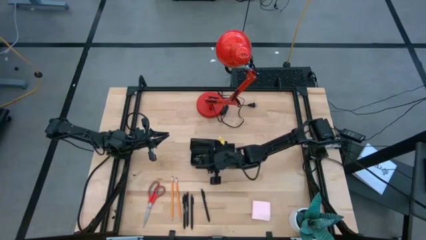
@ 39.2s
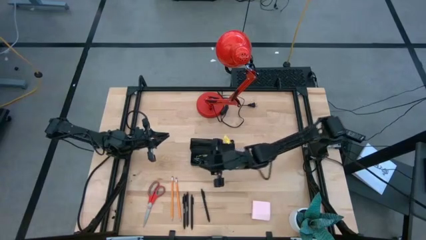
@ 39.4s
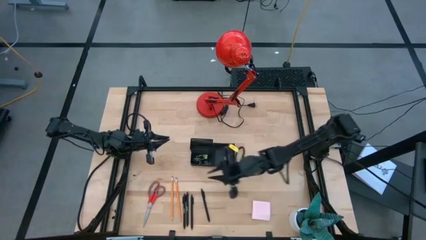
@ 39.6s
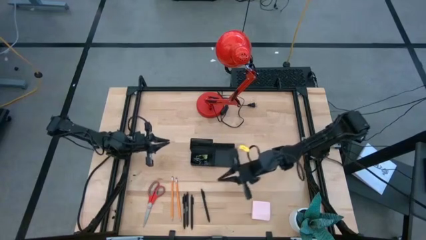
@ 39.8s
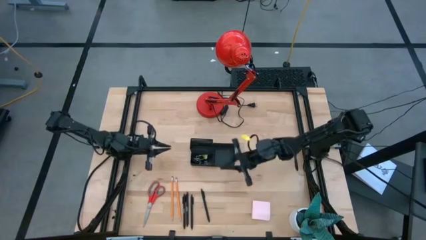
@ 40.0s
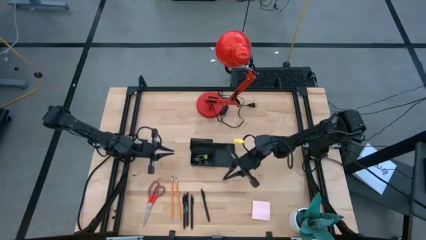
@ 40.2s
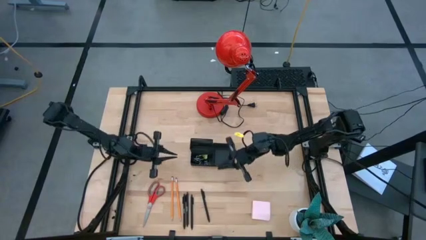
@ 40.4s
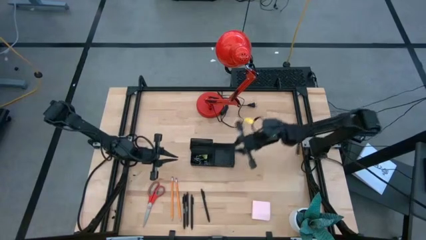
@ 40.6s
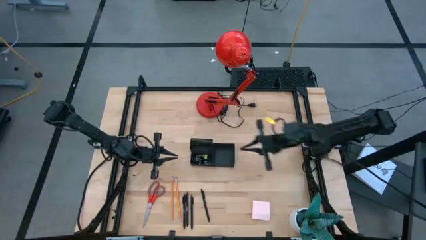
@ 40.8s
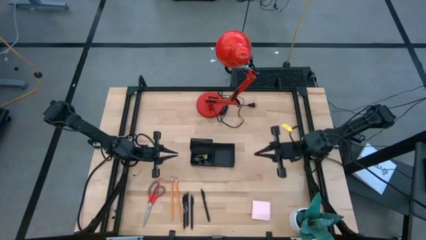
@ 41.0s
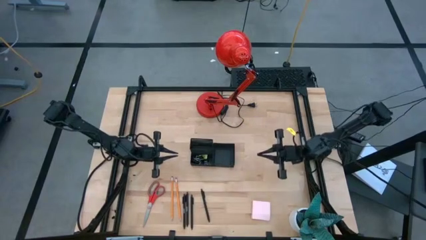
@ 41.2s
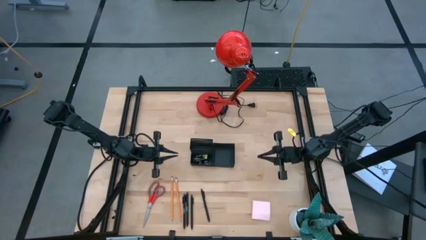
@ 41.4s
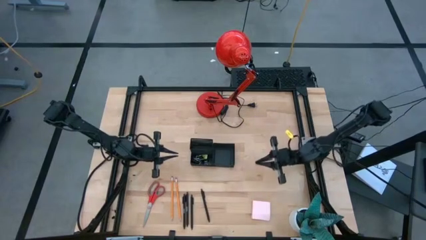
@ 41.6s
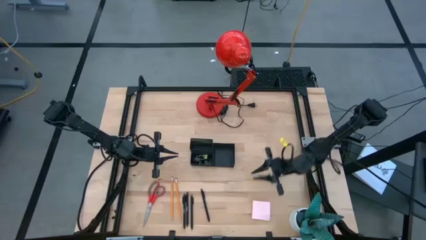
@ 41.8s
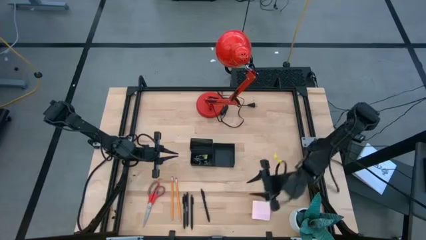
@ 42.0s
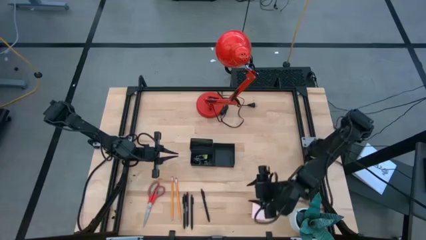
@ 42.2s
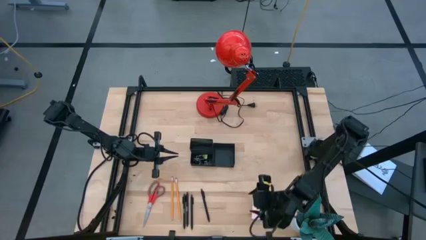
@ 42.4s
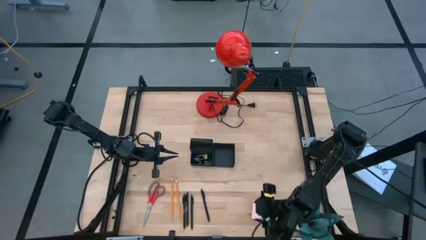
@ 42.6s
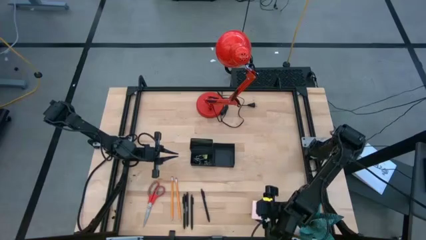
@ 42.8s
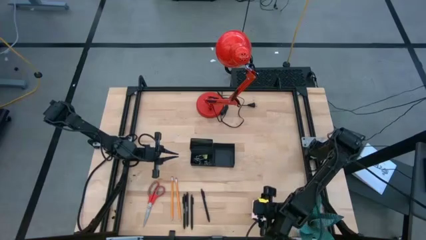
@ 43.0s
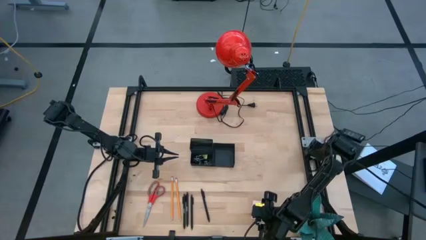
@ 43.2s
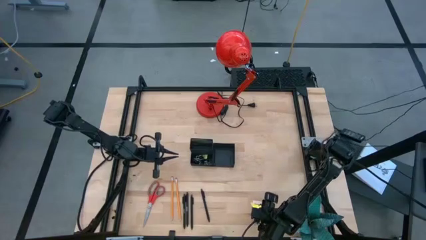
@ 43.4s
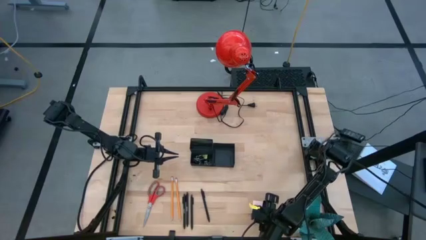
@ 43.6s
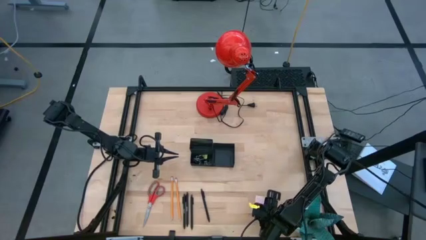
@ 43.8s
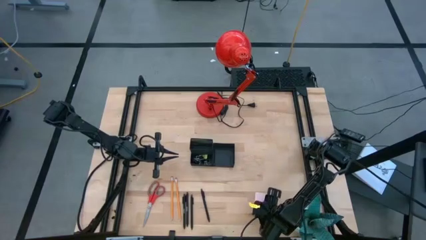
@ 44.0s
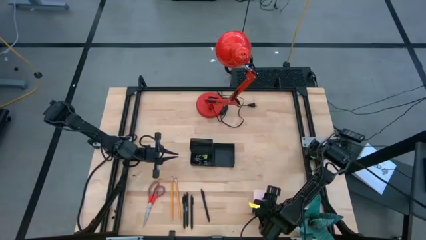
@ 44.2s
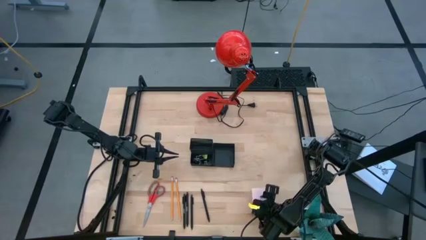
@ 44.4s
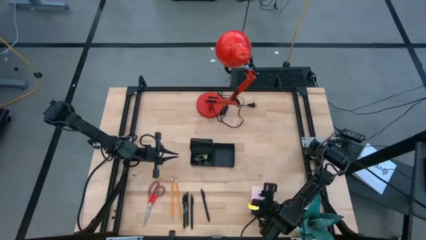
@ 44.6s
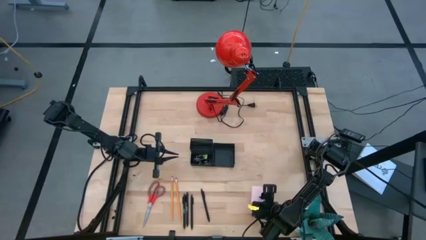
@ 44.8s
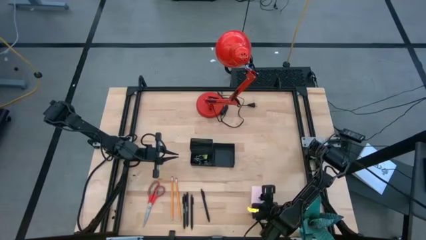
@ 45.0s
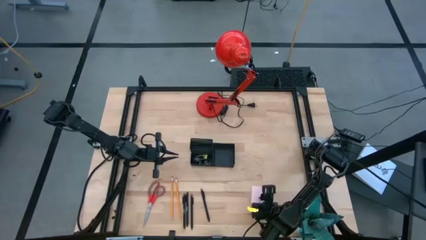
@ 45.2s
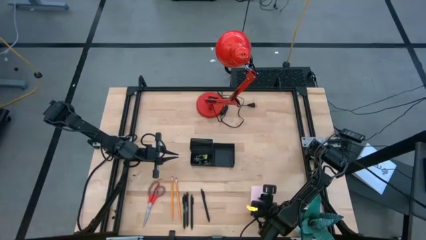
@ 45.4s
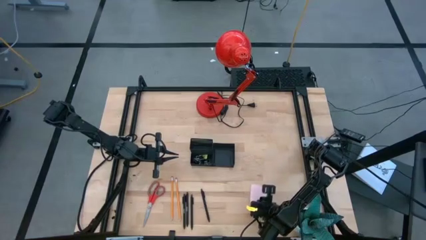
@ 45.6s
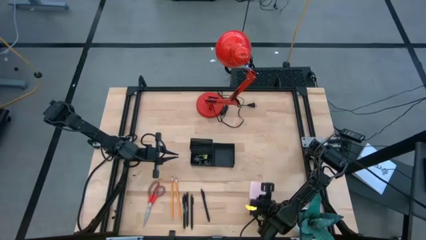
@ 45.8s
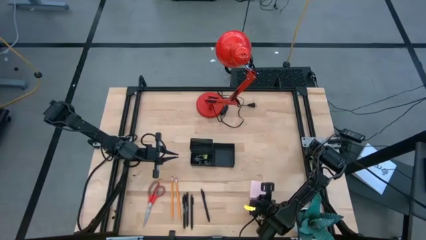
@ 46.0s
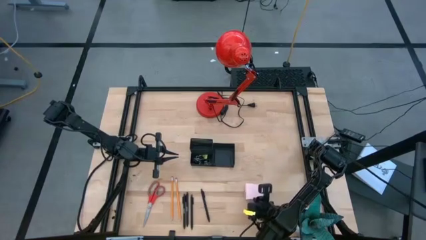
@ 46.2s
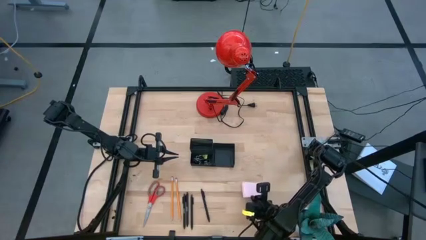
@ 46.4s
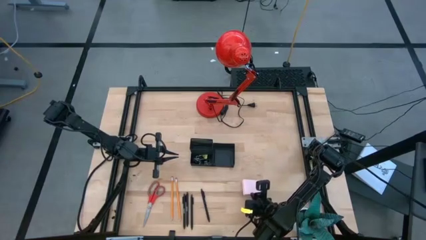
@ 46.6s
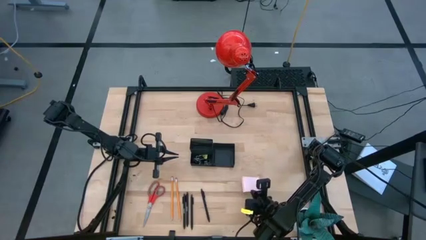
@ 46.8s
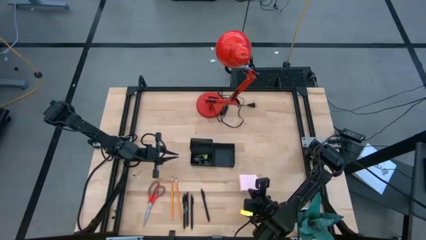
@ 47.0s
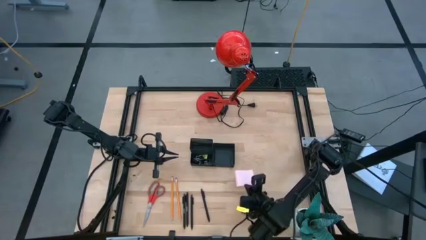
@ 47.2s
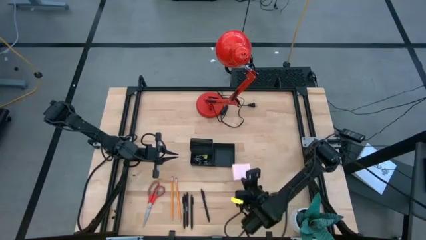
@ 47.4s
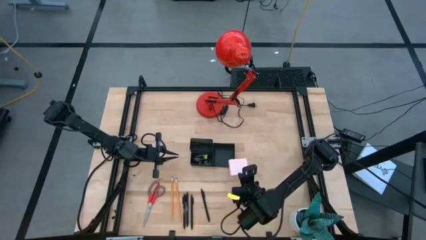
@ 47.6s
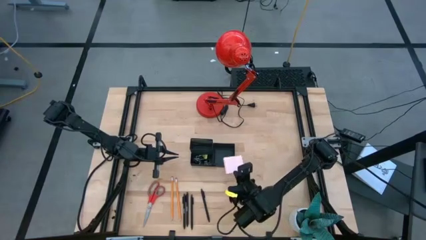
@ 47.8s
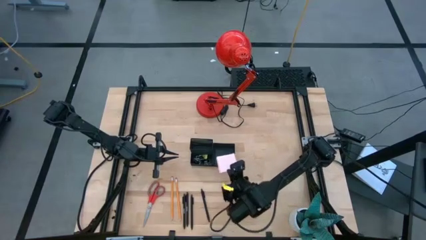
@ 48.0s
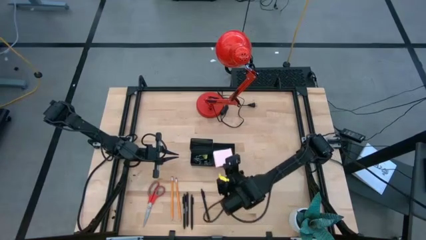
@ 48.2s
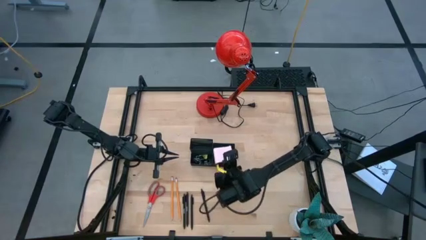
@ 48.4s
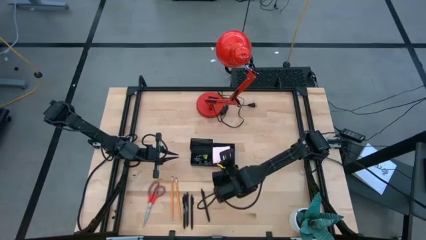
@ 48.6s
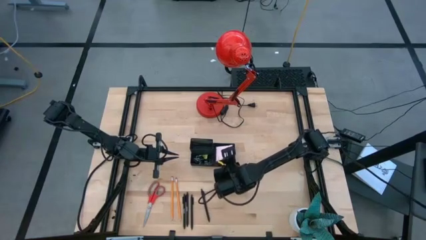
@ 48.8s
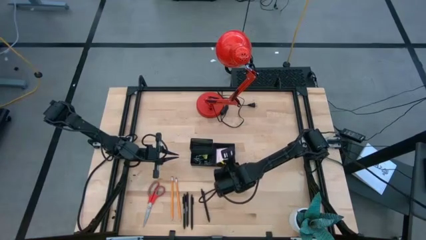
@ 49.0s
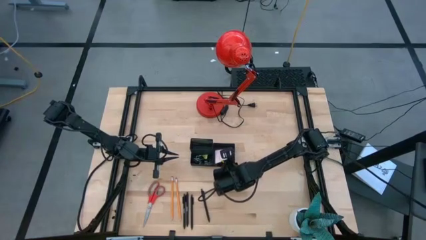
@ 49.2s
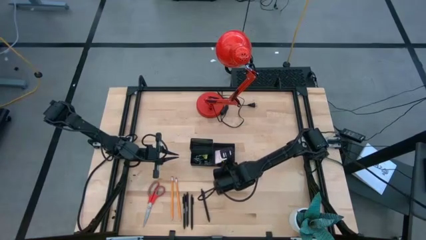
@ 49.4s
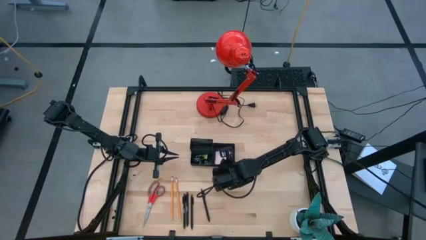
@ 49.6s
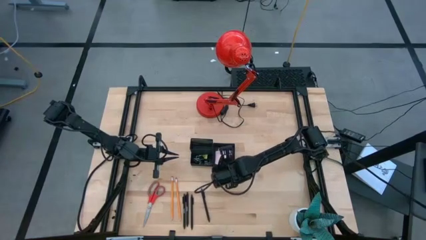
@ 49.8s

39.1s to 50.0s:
Task: Pick and place office supplies into organizer
Put the pink sticky note into the black mesh desk organizer

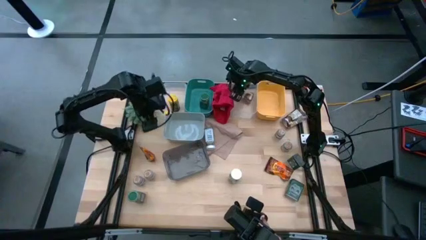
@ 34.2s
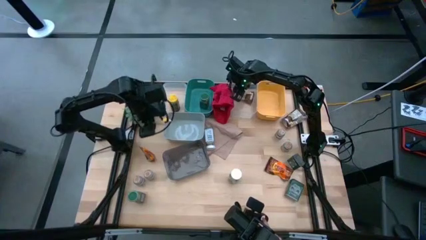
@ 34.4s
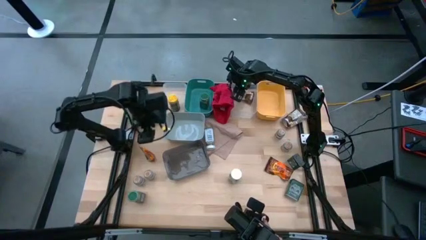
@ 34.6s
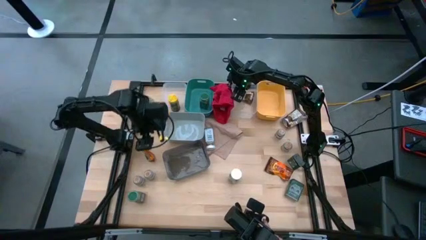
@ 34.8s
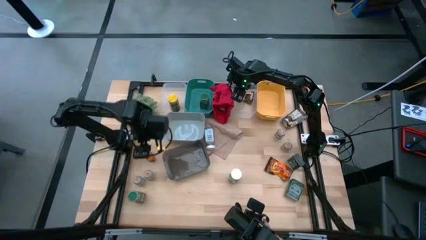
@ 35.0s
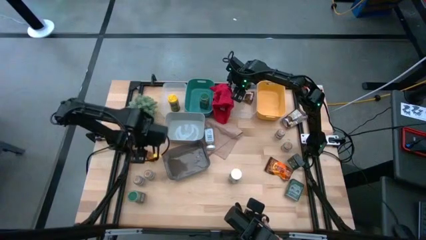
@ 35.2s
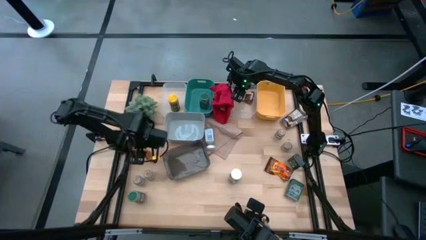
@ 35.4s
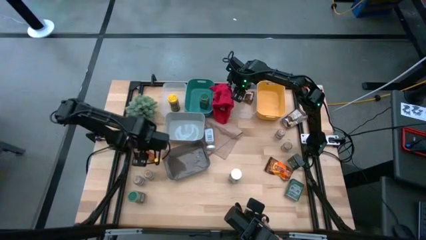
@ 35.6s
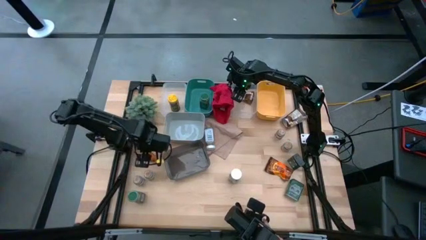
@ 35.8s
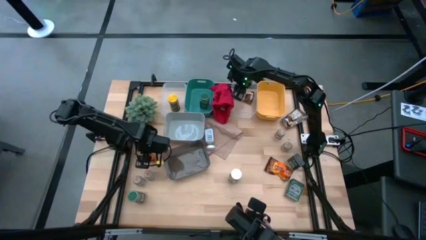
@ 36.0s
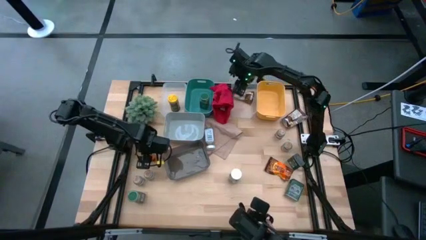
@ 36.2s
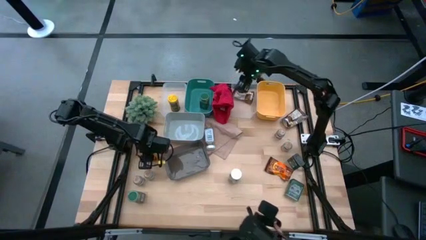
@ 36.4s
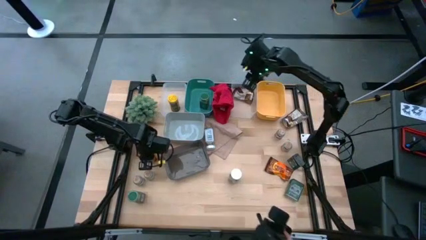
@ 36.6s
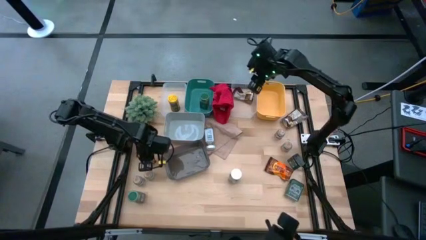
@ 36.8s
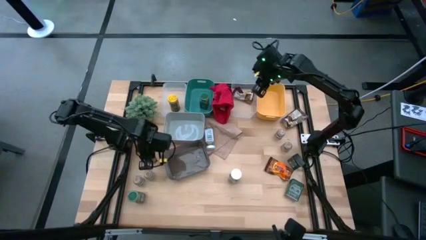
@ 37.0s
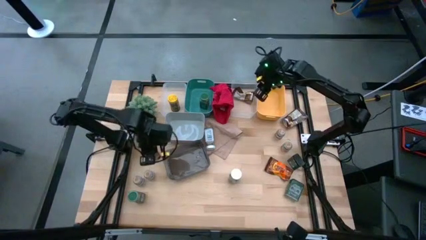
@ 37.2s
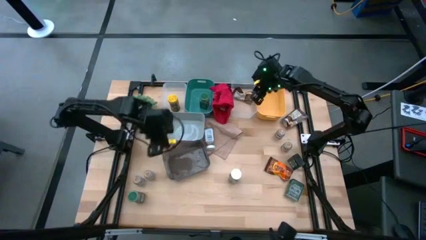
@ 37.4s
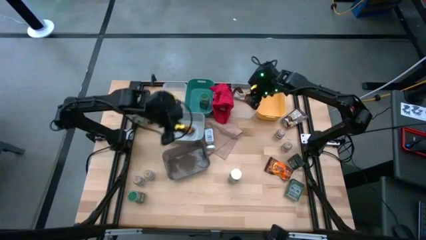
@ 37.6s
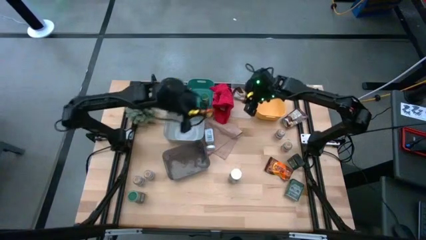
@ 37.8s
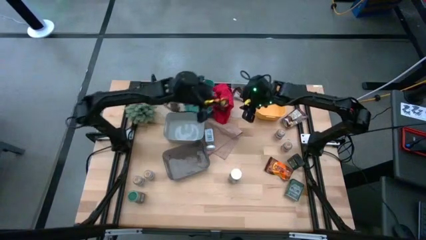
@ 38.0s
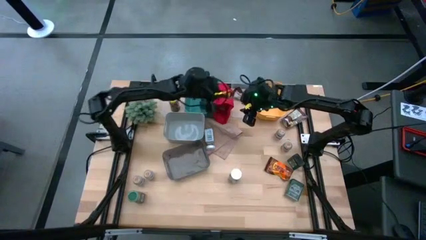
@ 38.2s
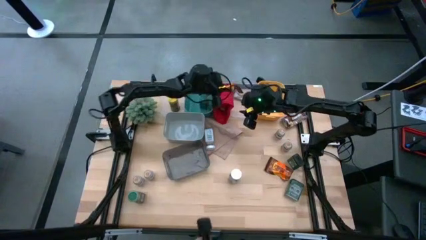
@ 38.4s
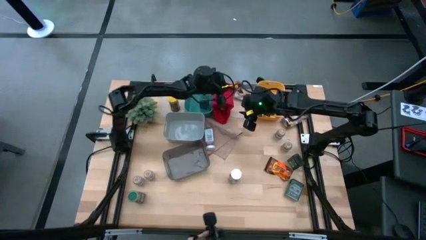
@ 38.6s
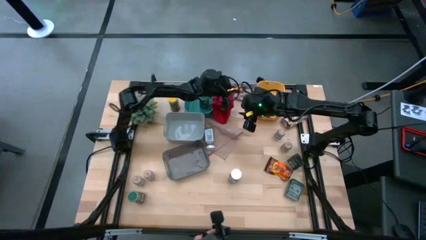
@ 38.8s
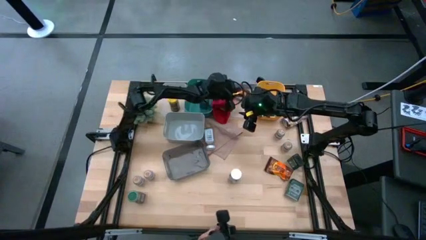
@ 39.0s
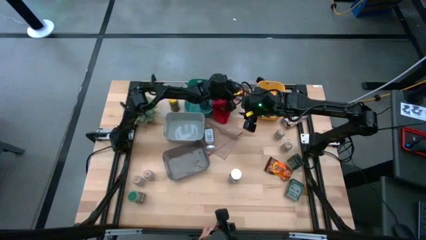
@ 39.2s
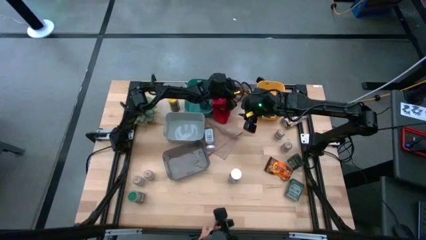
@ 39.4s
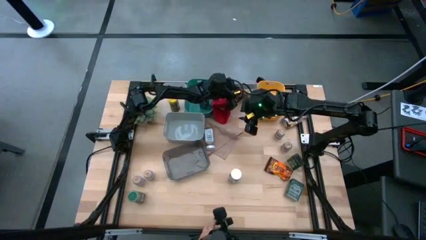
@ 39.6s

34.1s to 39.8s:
Task: Sort spices by type
Put the orange seasoning pack into the right transparent bin
